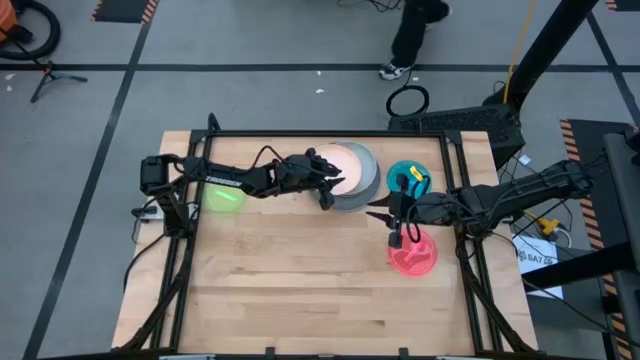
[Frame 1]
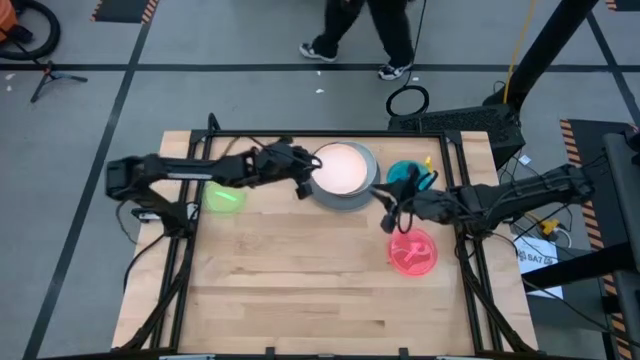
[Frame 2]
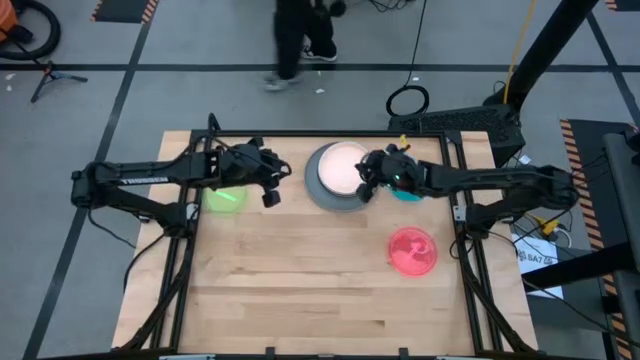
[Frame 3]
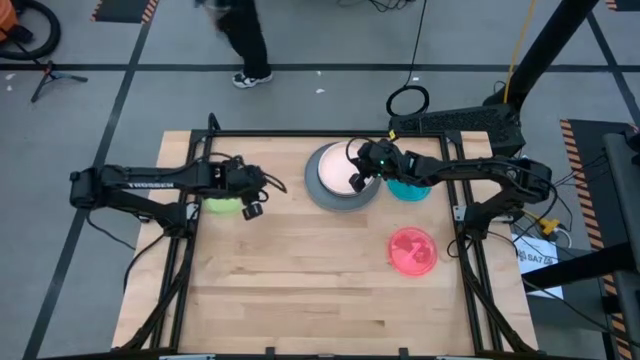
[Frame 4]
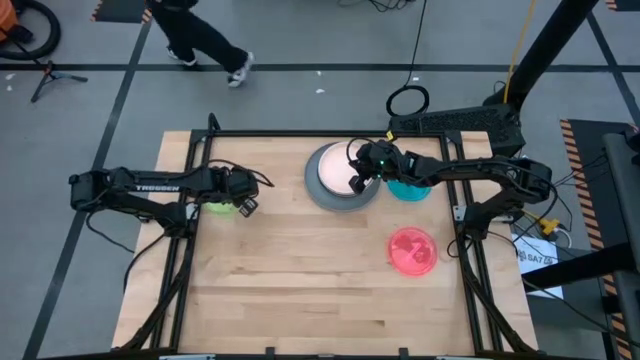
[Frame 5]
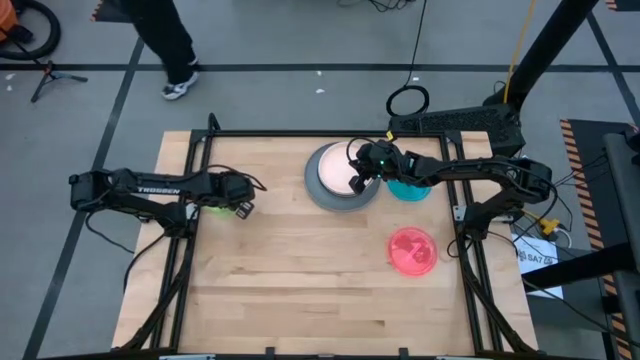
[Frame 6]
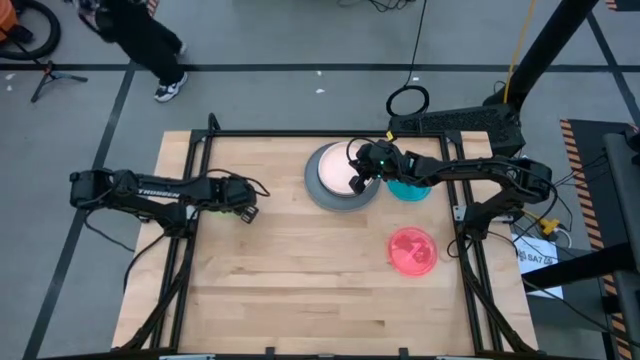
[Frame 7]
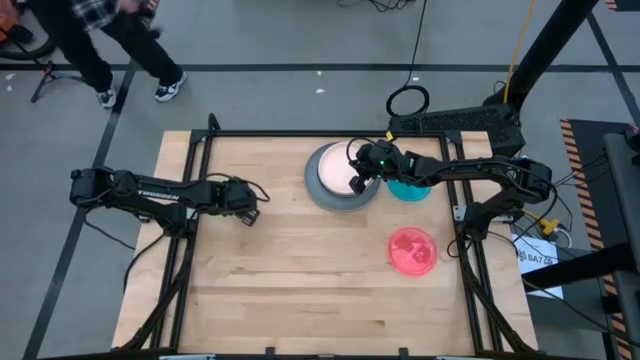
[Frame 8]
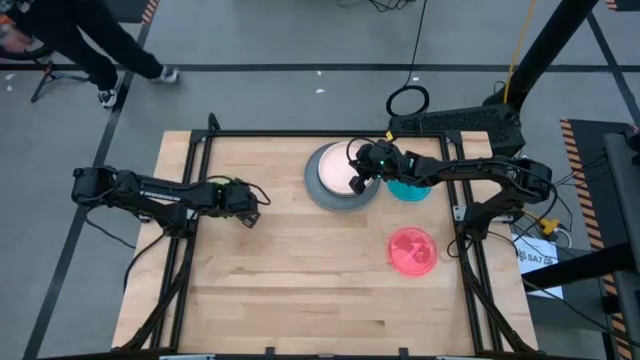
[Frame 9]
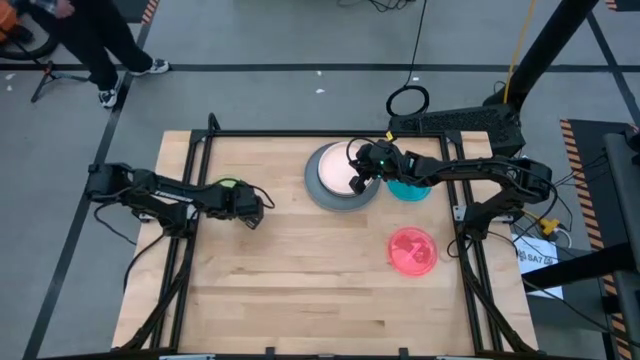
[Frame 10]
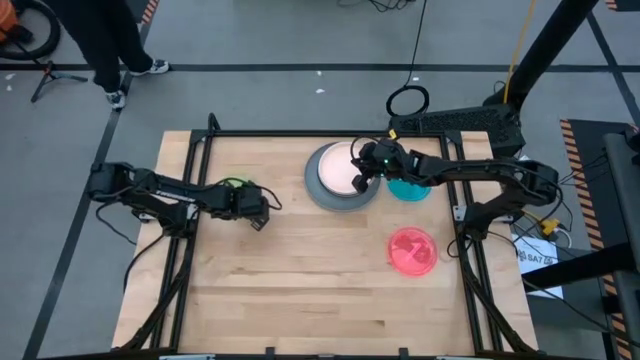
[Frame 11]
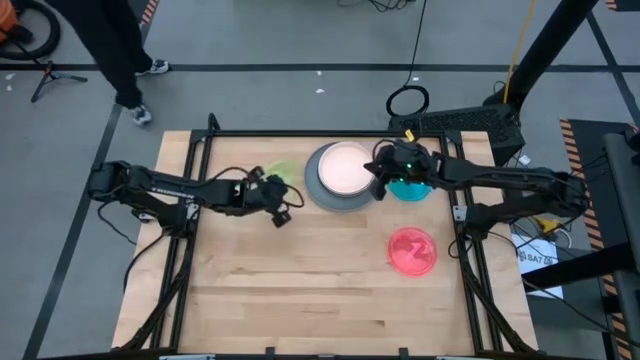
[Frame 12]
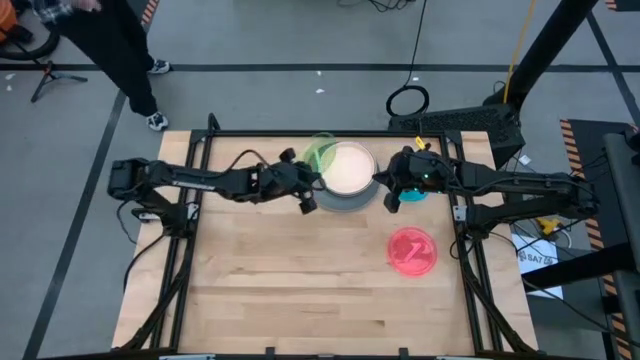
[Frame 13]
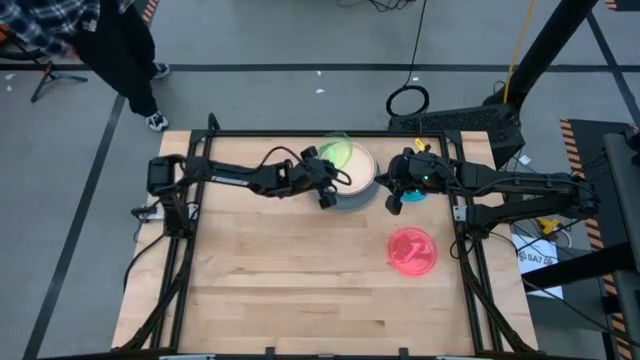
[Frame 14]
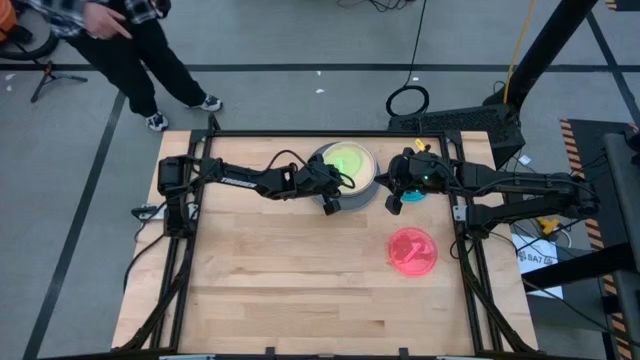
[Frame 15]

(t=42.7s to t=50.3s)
Task: Stack plastic plates
Stack the transparent green plate on top of the light orange plate

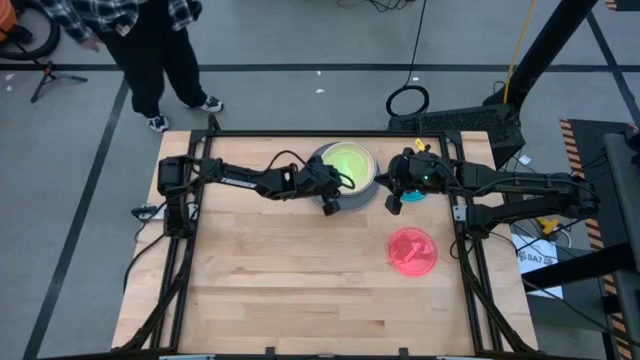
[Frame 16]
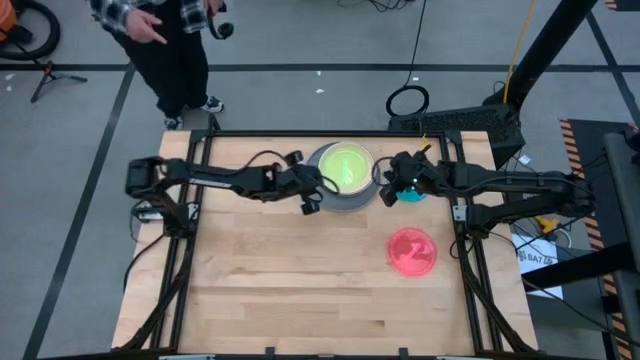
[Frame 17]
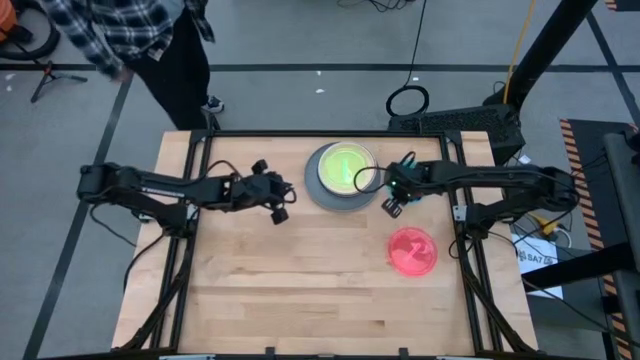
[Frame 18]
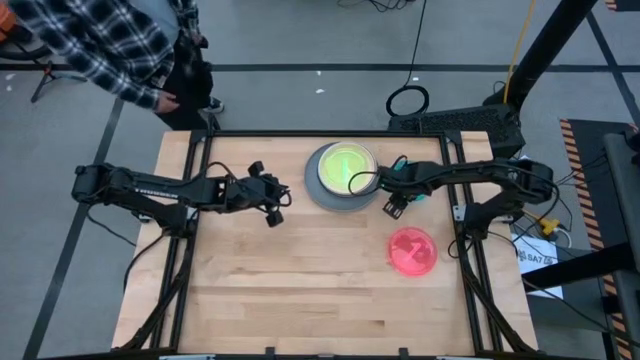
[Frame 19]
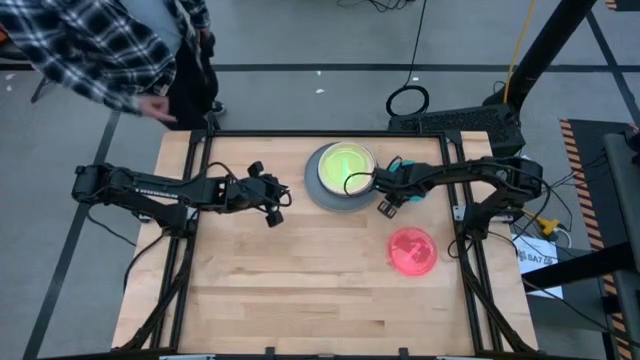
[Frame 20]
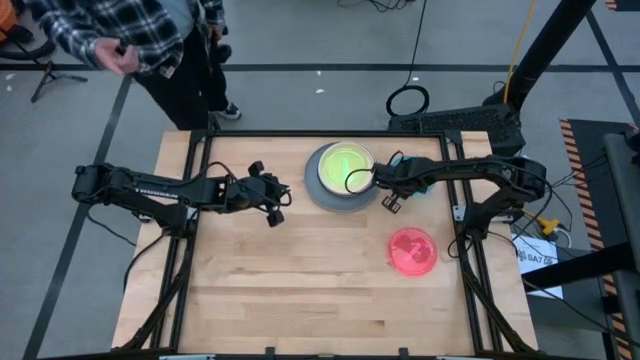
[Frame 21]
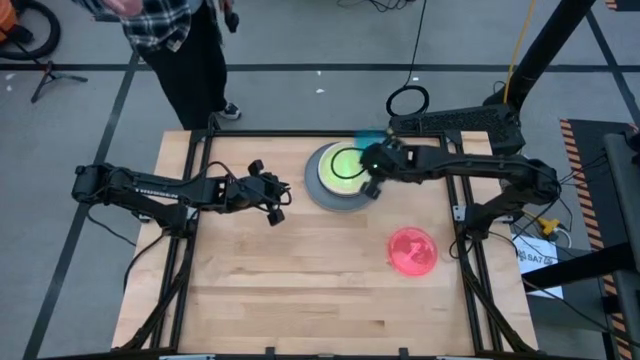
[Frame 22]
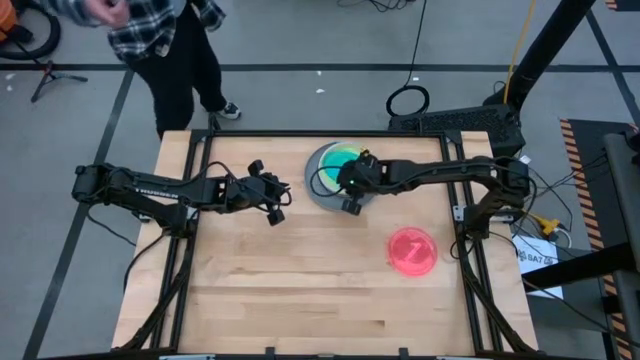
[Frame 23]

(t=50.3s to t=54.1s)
Stack the transparent blue plate on top of the transparent green plate

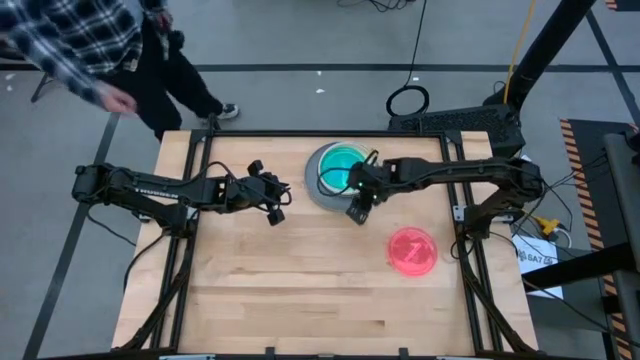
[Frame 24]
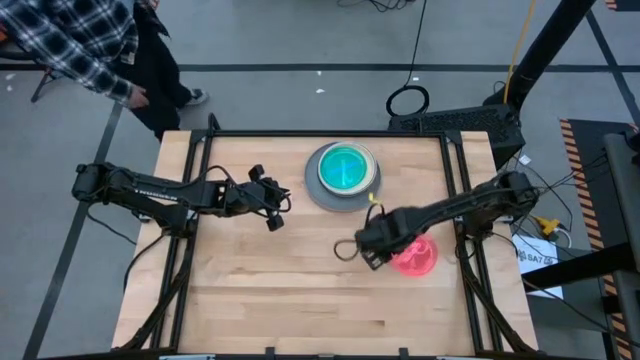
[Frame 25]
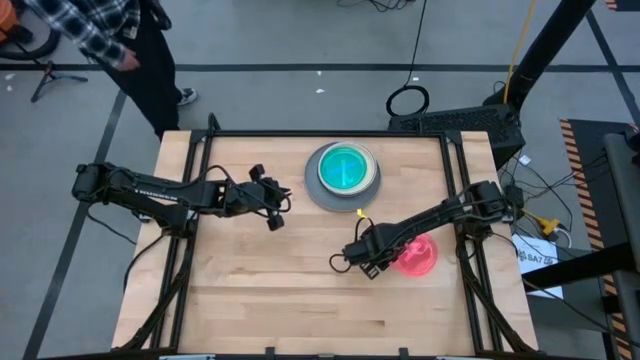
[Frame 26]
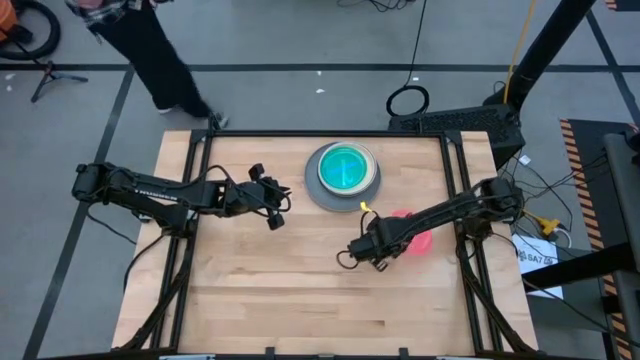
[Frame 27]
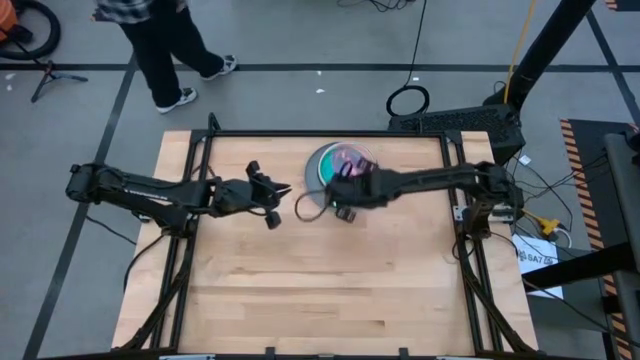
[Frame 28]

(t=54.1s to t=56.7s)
Stack the transparent pink plate on top of the transparent blue plate

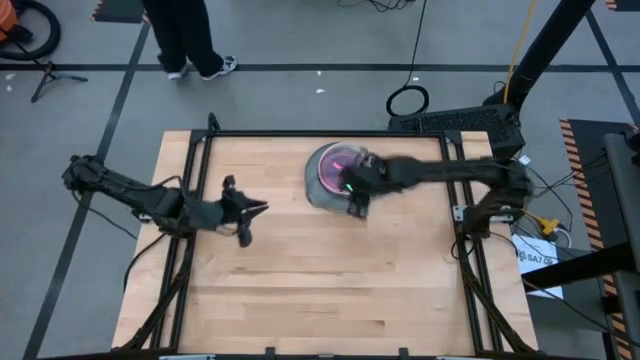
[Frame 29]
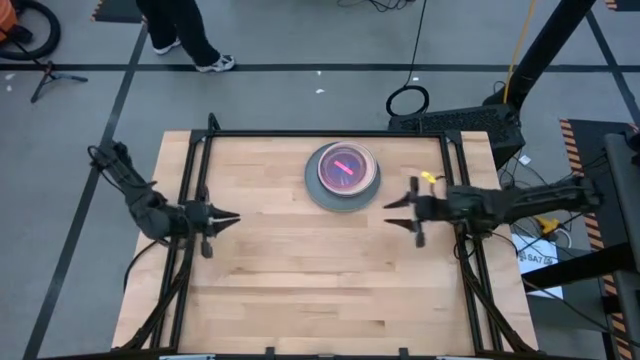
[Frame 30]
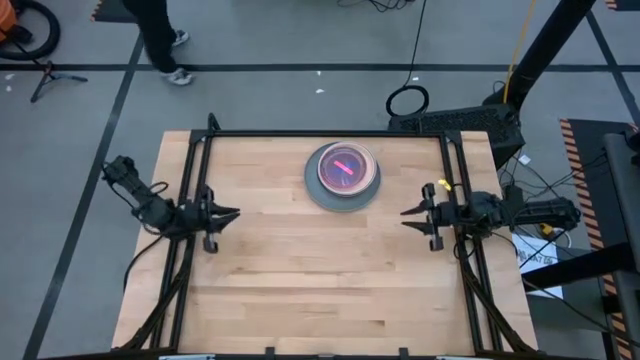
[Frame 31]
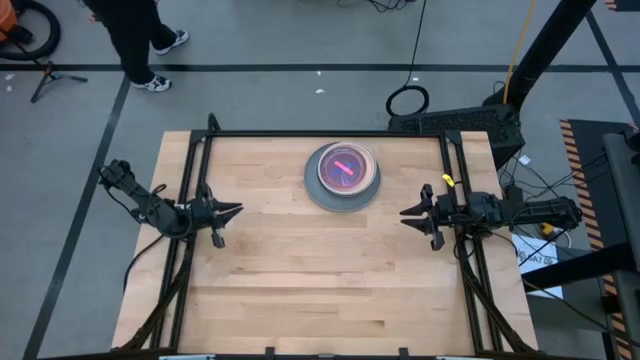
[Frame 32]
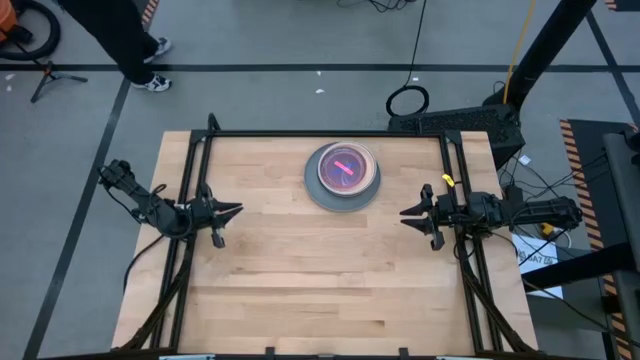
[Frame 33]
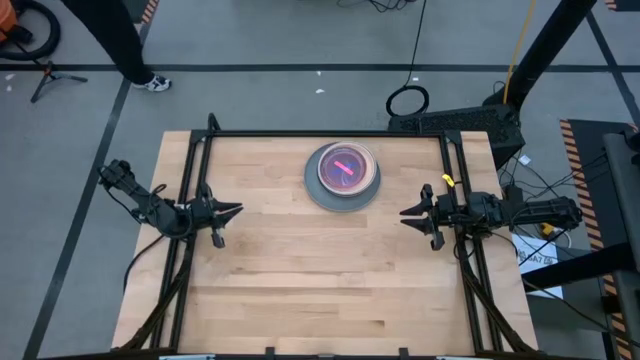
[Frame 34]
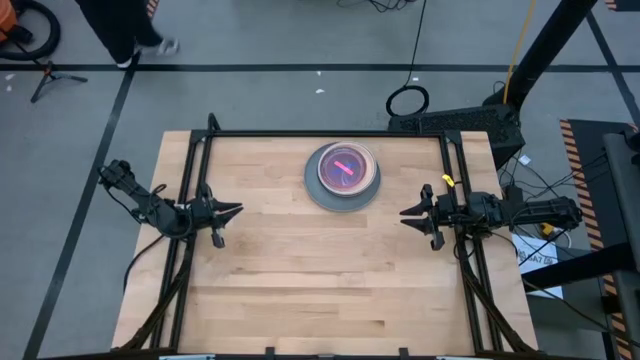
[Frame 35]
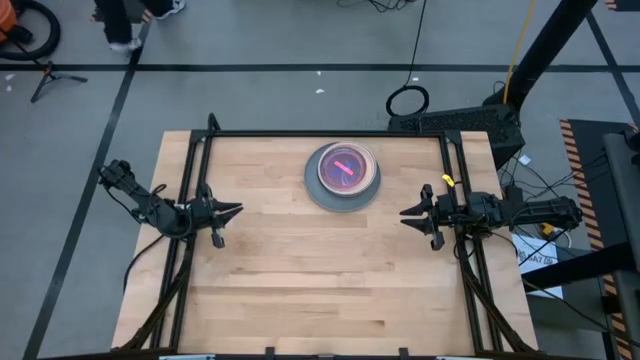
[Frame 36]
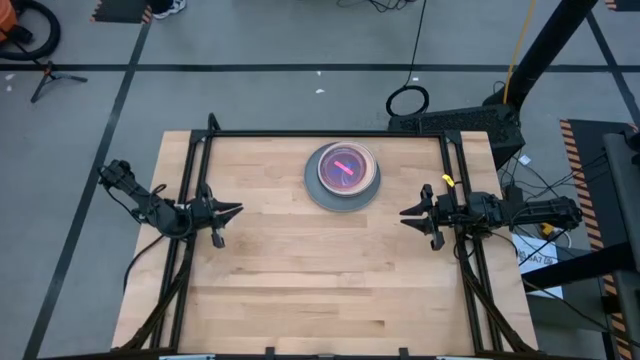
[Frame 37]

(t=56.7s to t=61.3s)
Return to Home Position

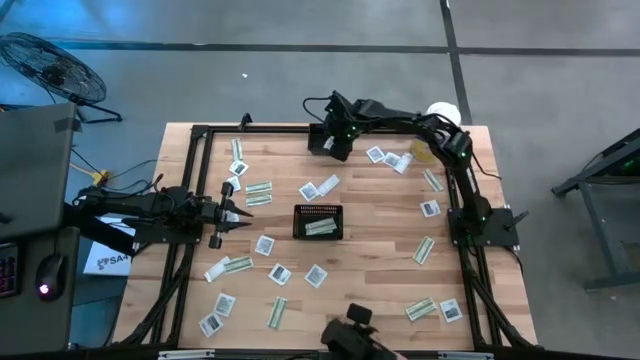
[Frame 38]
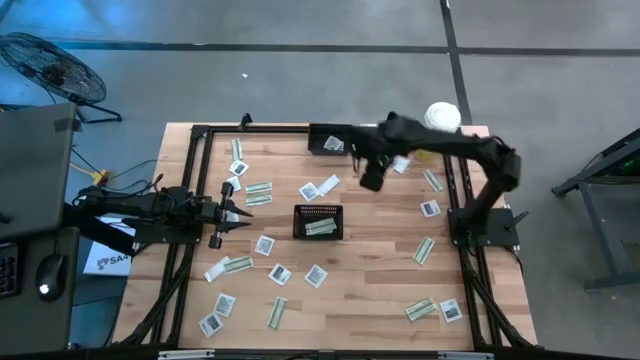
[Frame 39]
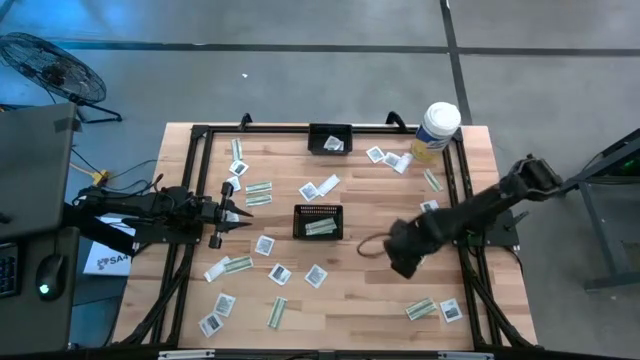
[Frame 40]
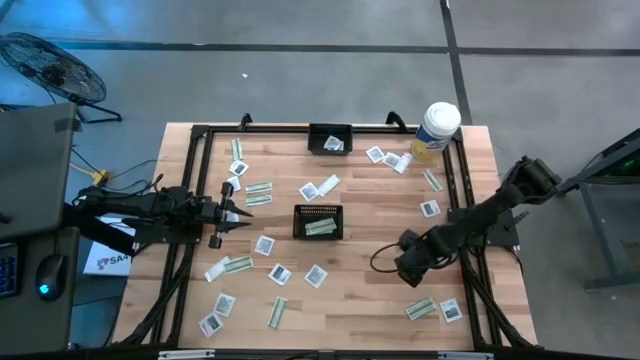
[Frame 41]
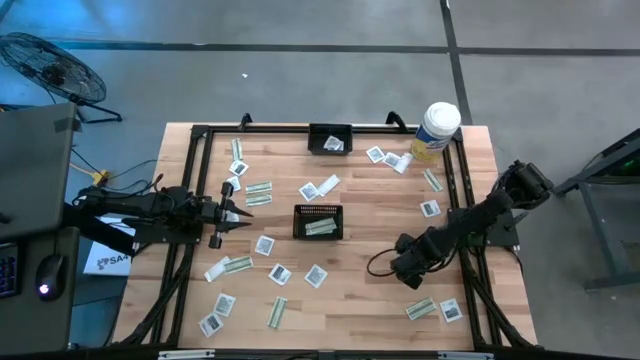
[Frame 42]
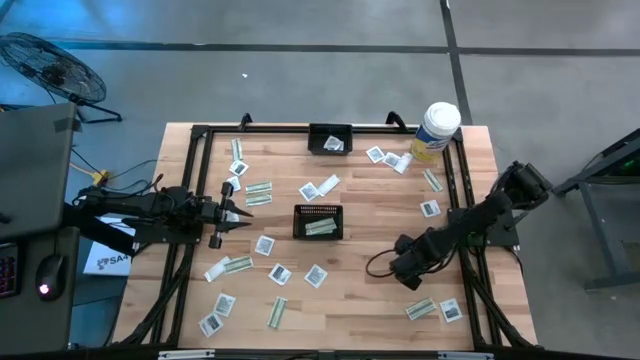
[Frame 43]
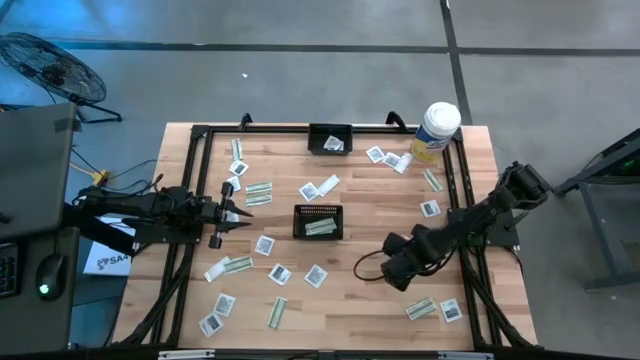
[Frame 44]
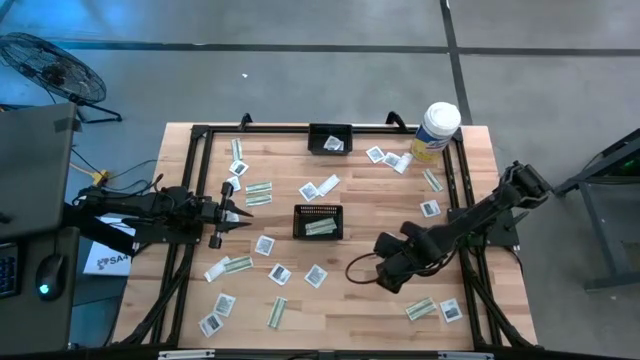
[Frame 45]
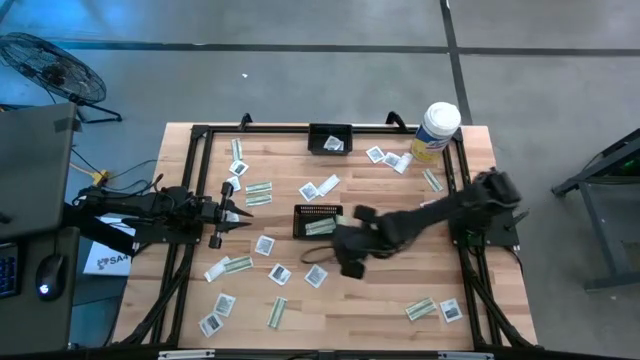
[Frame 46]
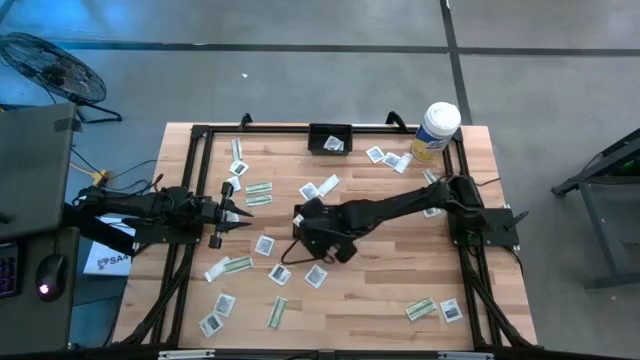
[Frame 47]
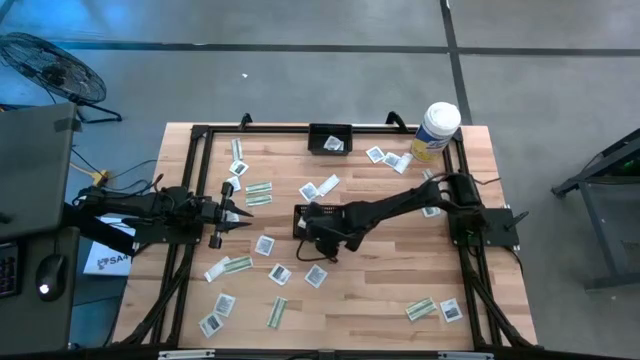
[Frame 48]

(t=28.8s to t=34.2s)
Task: Pick & Place First Aid Supplies
Put the bandage into the bottom black basket
